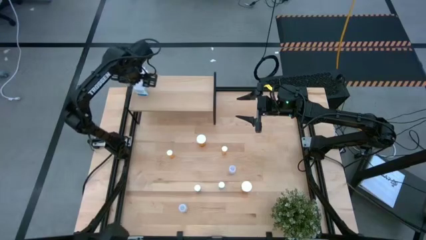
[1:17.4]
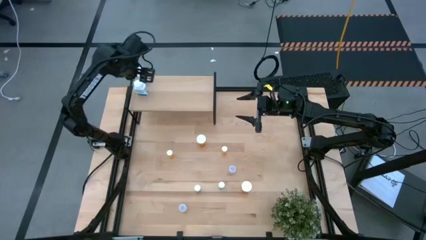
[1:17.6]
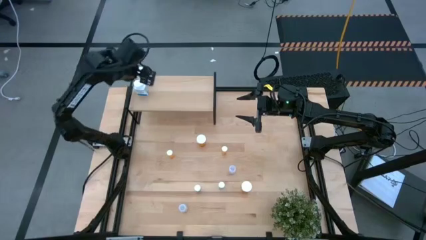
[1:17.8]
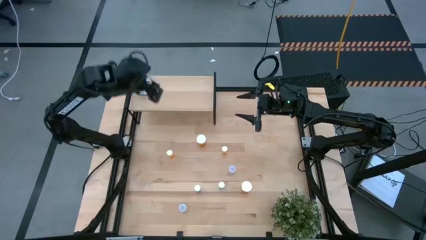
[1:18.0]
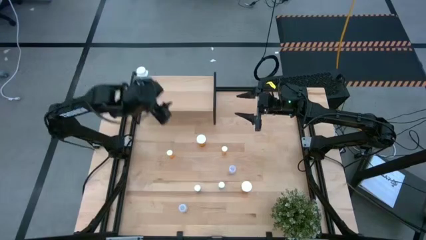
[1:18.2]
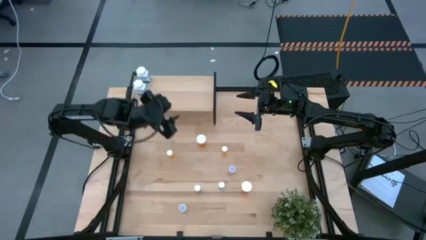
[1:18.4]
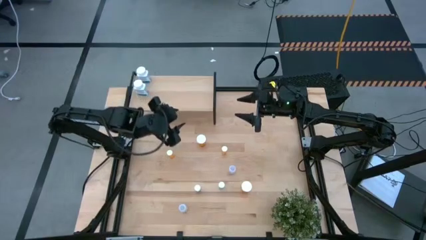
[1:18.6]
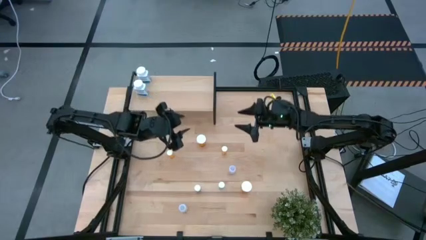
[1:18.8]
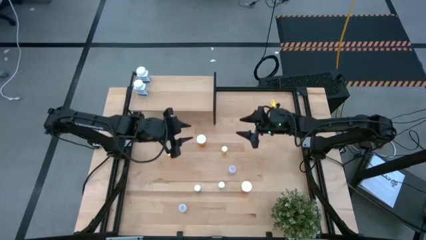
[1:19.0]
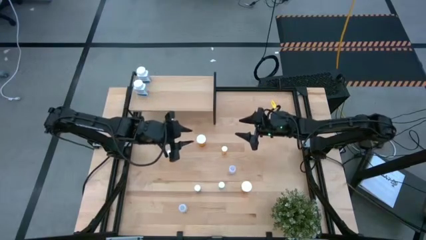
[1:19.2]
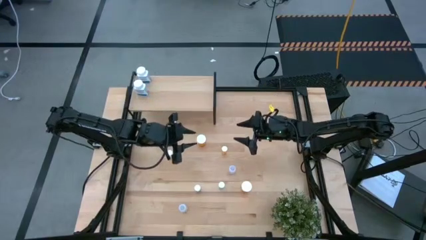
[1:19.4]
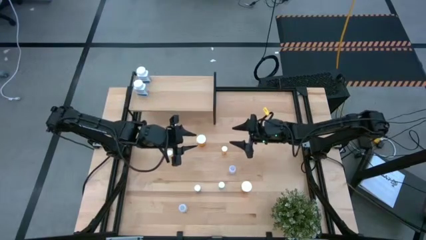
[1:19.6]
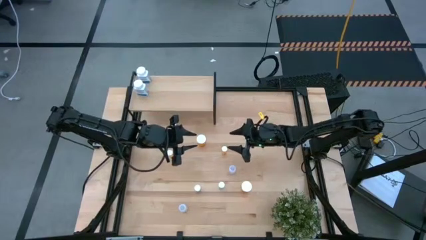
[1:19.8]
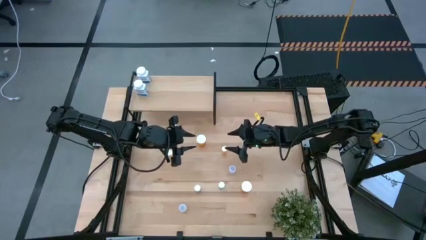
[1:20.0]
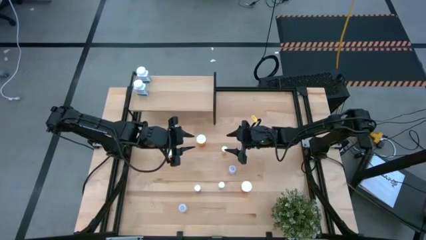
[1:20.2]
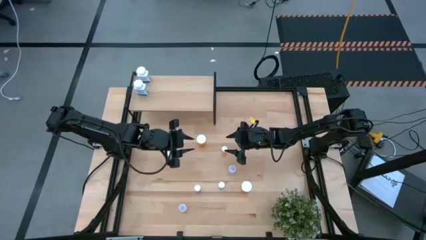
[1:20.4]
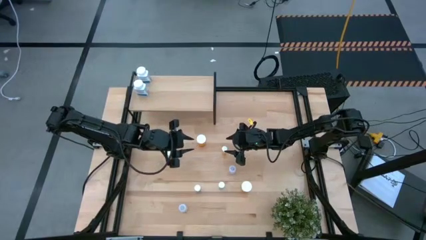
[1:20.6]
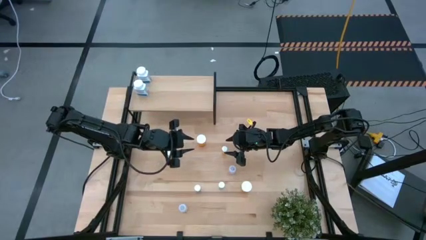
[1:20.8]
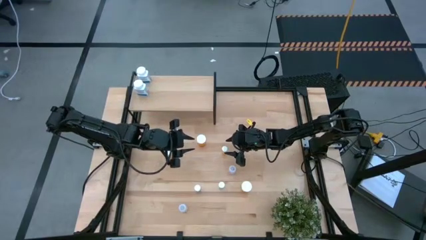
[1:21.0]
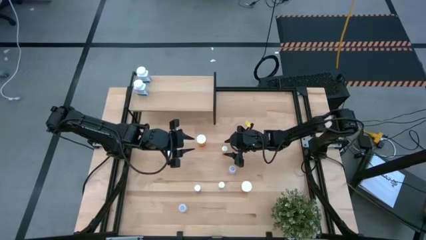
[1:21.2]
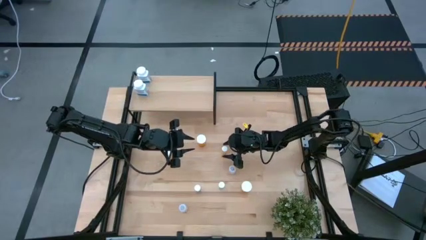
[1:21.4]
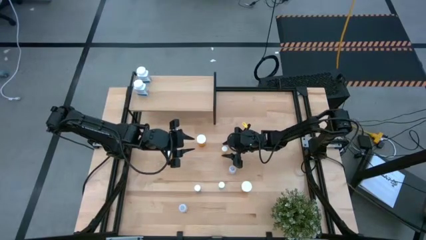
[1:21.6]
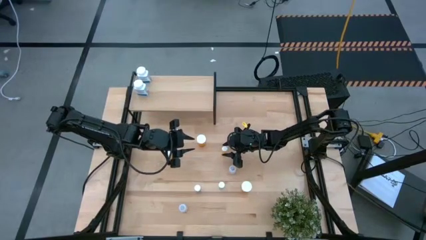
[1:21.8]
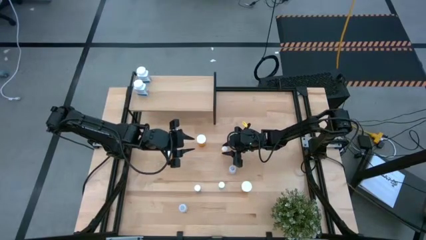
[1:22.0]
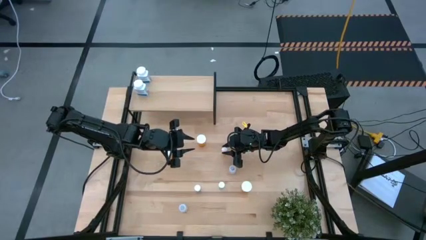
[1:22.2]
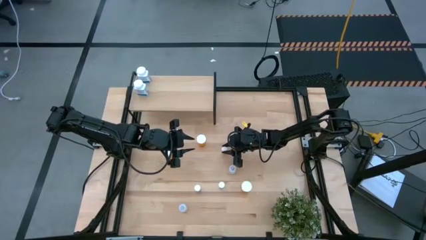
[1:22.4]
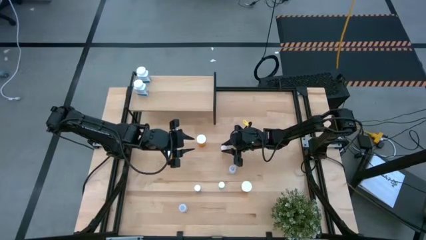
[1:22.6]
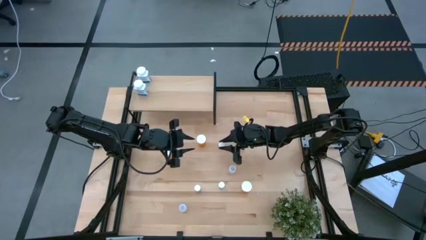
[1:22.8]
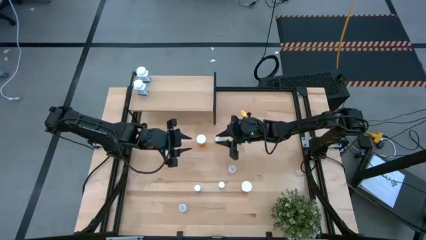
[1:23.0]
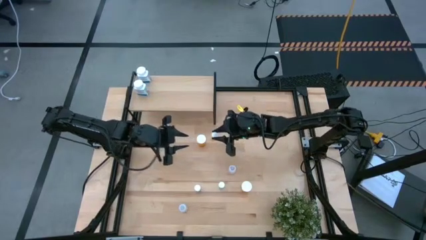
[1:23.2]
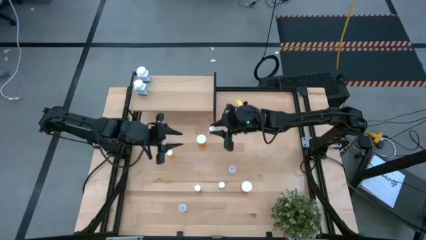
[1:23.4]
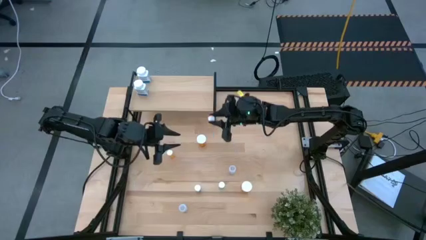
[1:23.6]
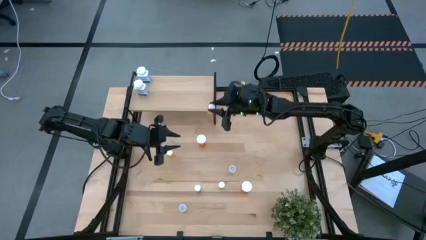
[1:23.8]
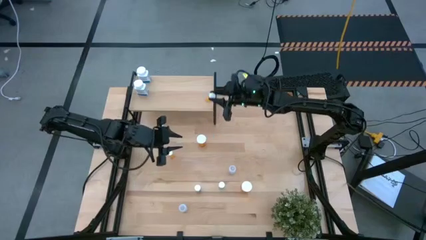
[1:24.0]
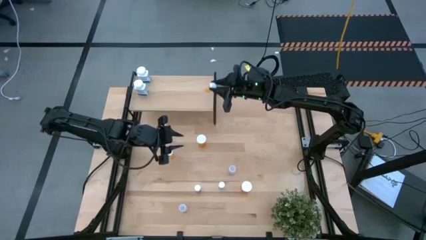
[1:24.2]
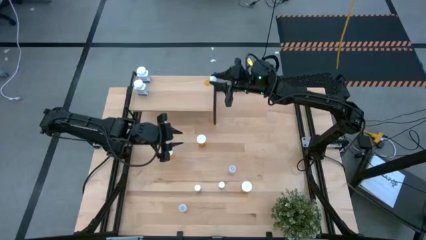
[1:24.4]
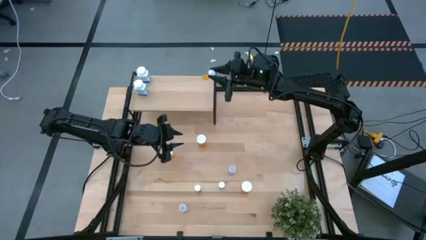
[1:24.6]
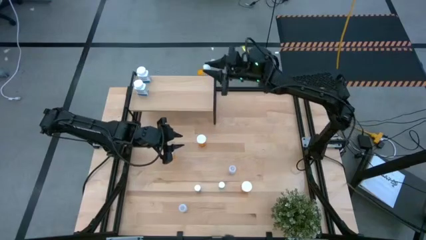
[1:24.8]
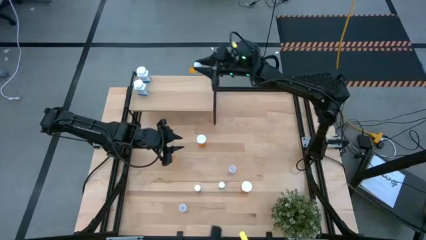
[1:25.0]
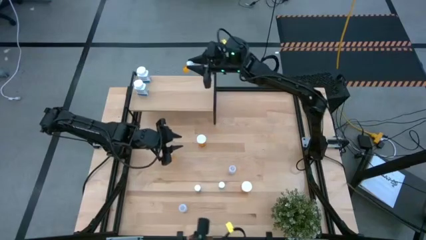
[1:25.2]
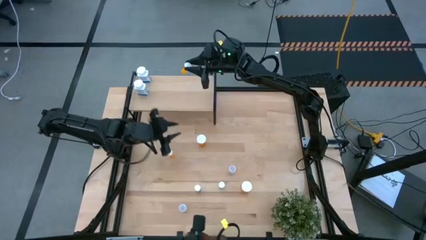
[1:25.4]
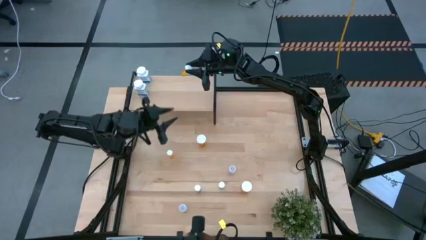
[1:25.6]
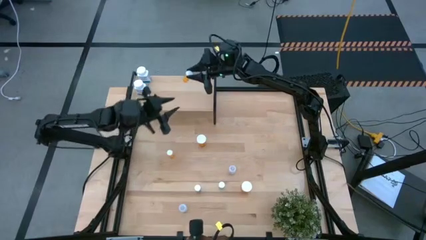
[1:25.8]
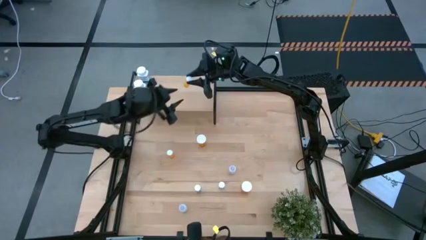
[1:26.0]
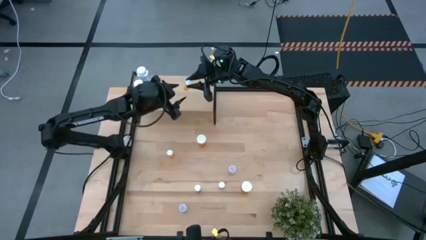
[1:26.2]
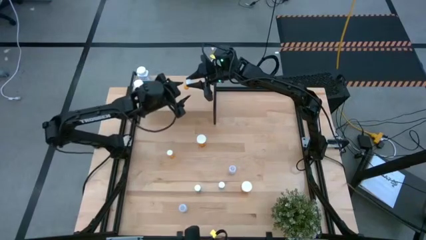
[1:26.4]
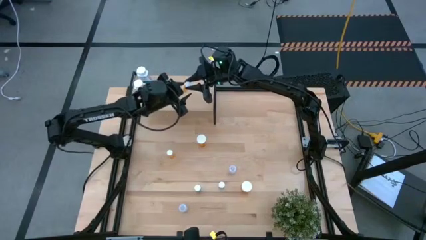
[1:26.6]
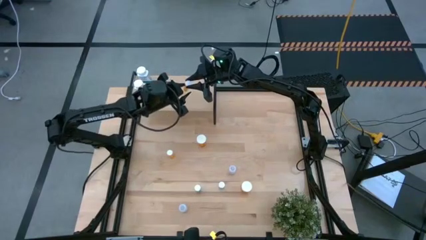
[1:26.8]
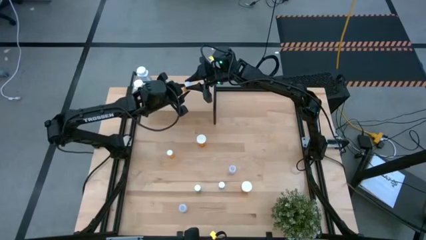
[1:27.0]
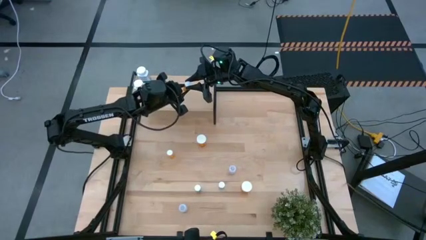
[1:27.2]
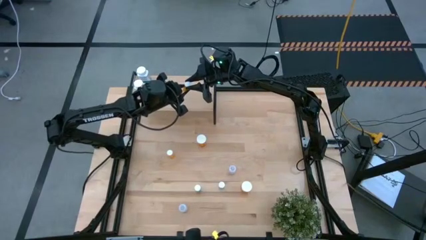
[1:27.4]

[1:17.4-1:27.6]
Task: Pick and place medicine bottles onto shelf by color
Put the right small orange pill bottle on the shelf

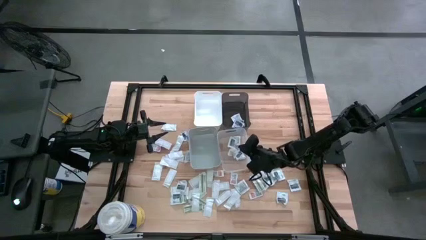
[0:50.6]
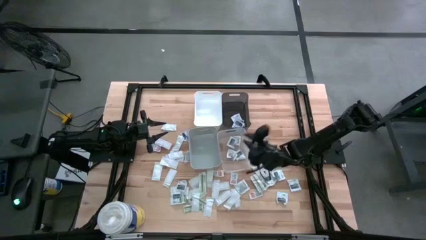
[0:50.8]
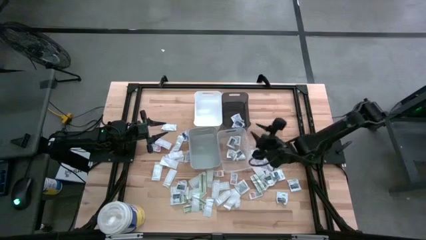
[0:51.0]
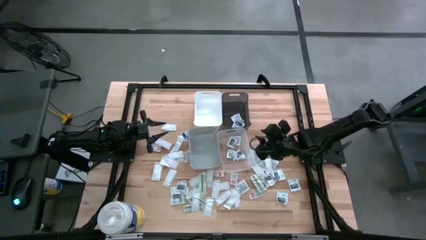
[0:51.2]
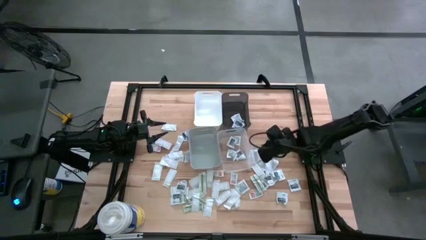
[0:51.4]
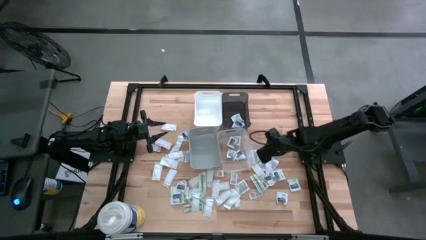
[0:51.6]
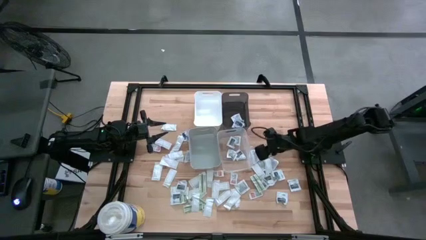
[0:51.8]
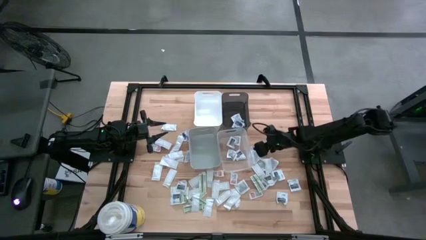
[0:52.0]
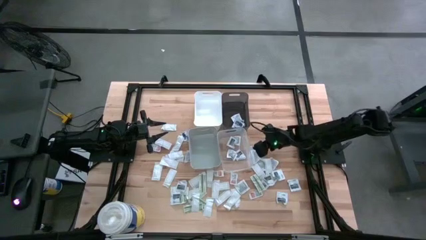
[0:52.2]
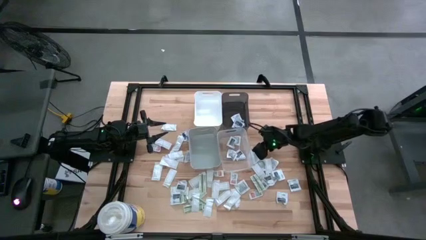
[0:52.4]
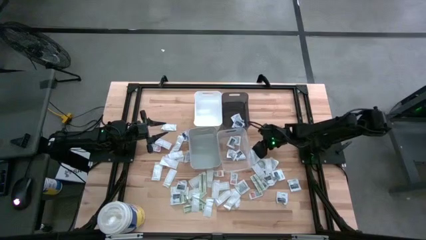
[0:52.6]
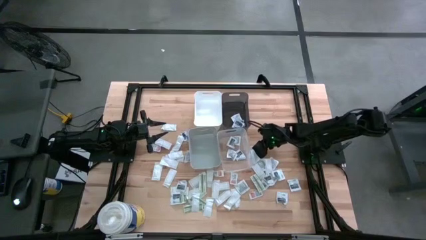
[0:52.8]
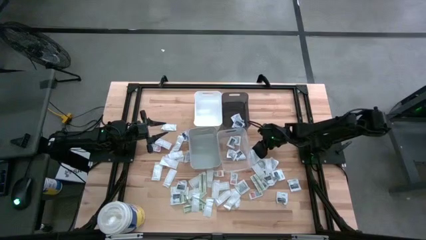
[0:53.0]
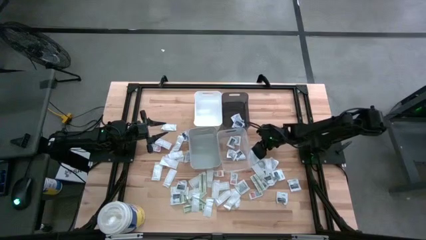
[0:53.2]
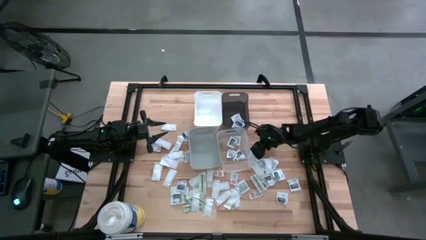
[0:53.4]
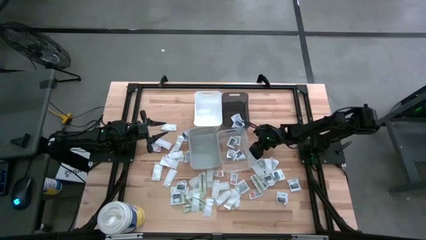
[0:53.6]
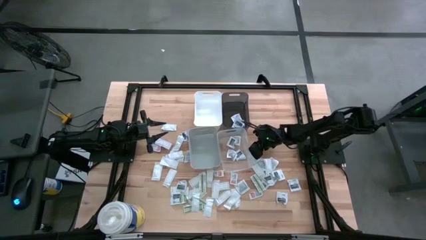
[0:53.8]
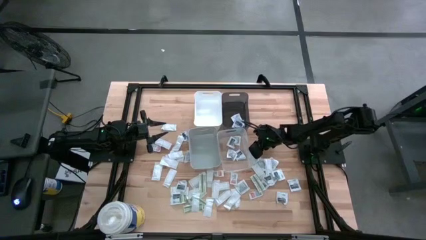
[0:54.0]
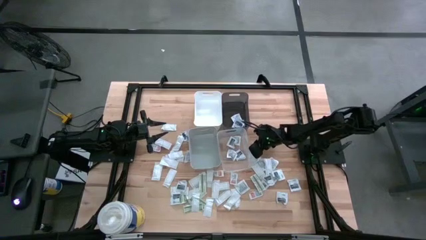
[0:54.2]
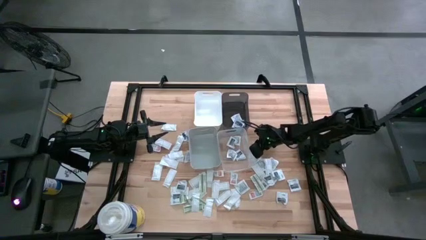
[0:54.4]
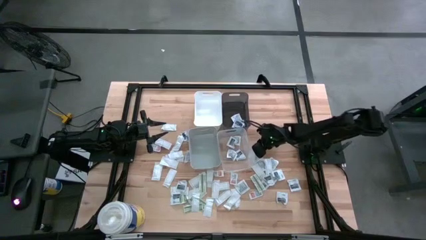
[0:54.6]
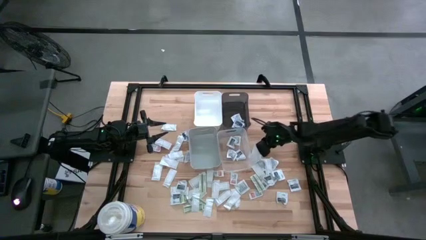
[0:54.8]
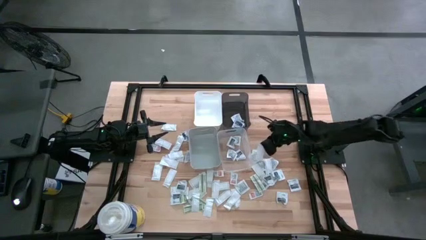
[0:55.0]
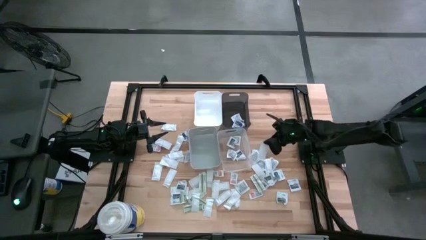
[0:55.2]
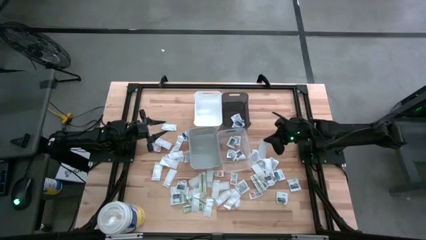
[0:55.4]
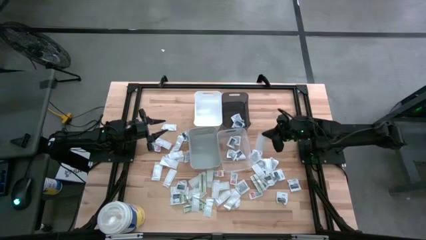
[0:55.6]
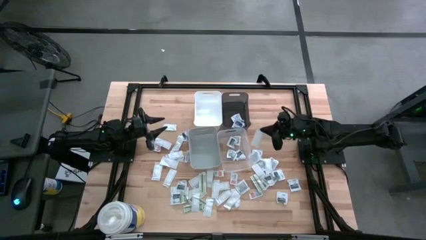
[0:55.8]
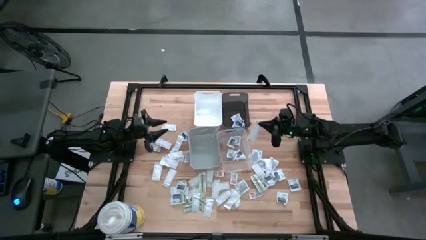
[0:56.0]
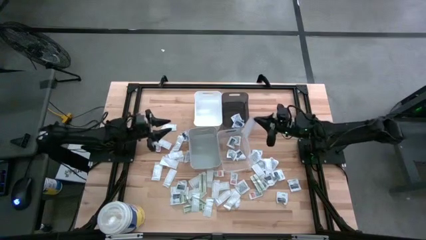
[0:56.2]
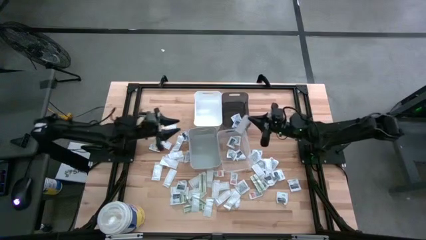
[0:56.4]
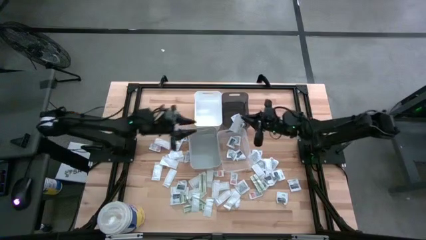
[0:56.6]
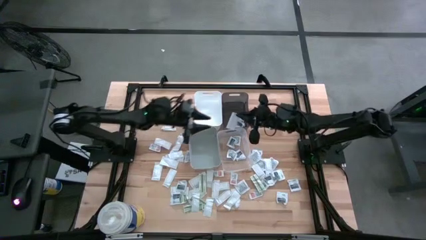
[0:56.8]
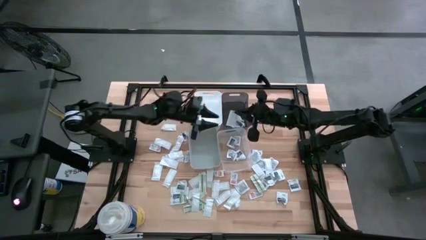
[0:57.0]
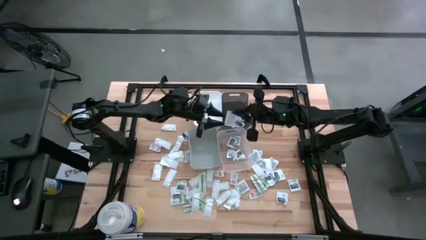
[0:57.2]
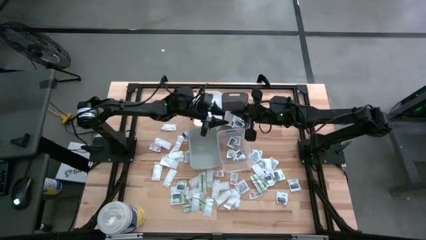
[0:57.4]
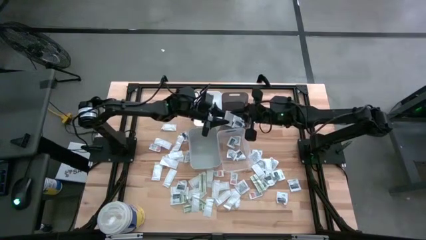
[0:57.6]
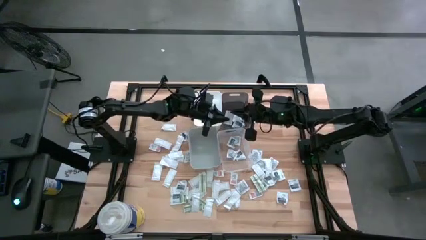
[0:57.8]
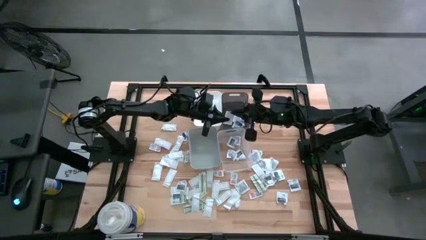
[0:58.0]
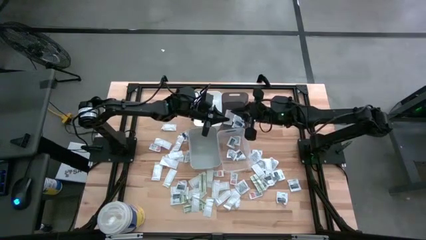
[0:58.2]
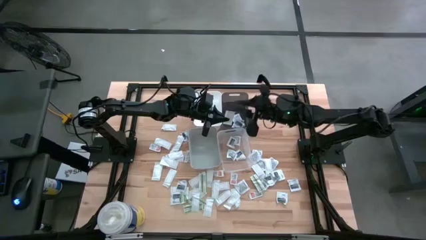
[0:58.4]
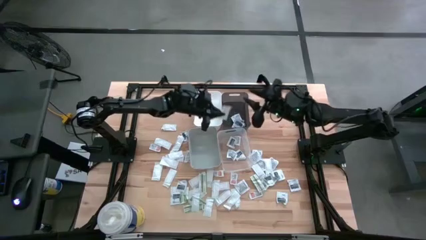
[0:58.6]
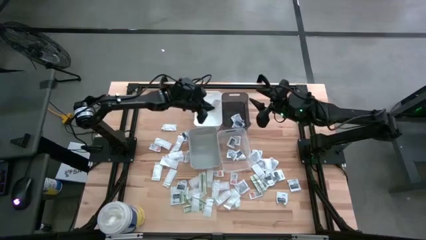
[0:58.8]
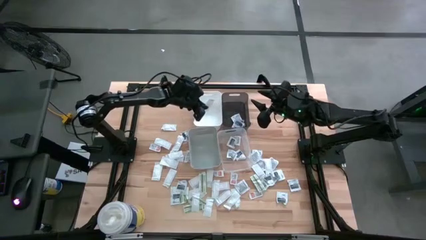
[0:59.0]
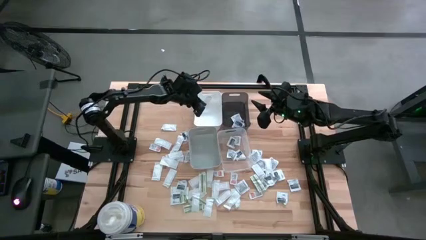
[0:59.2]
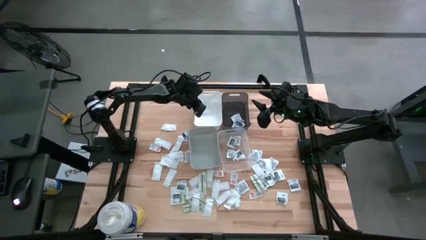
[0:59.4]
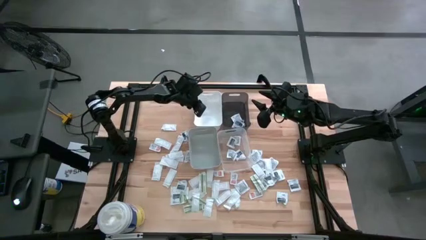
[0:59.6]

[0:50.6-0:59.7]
Task: Pick & Place First Aid Supplies
Put the green bandage pack into the white bin
